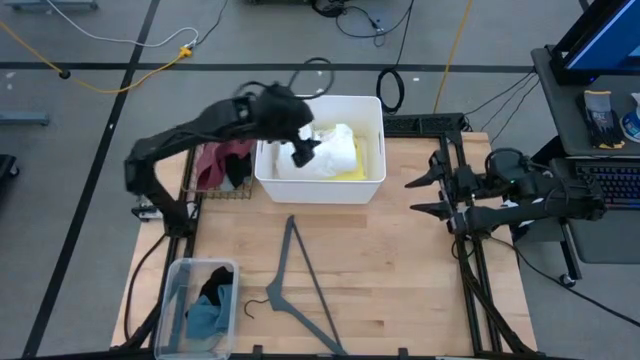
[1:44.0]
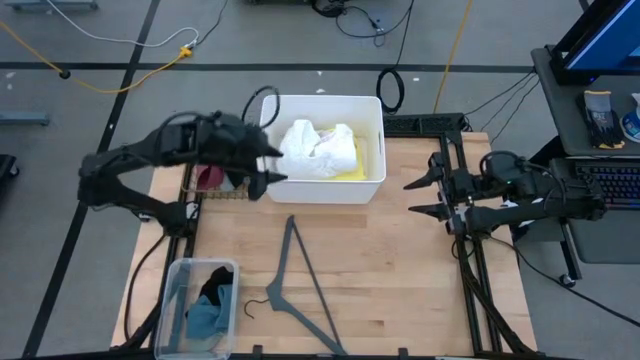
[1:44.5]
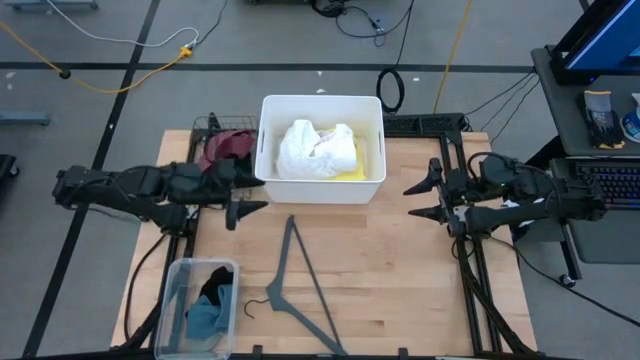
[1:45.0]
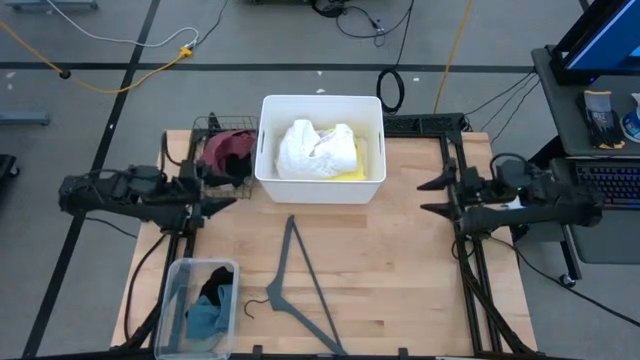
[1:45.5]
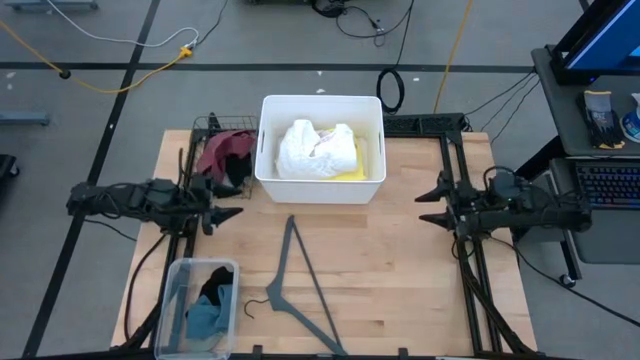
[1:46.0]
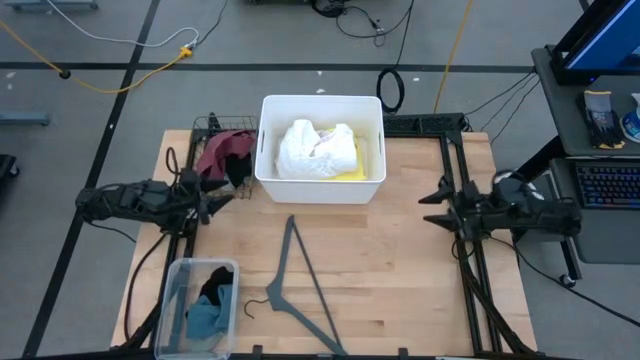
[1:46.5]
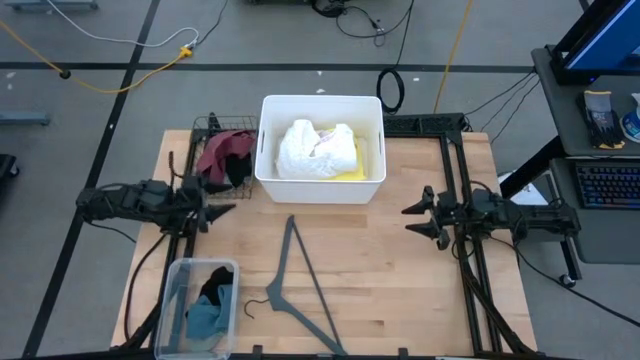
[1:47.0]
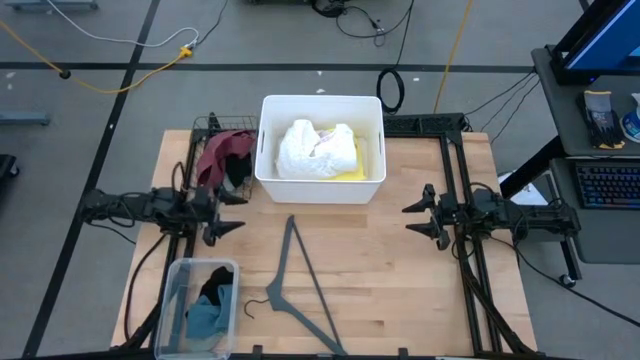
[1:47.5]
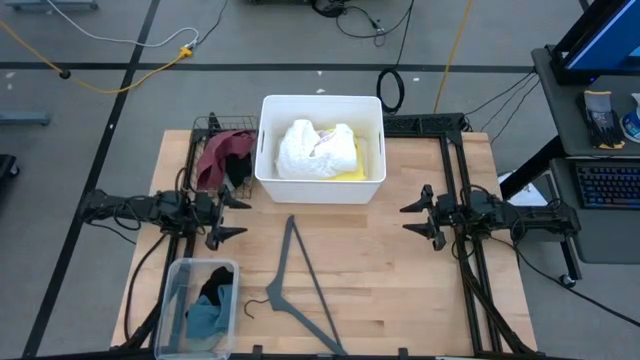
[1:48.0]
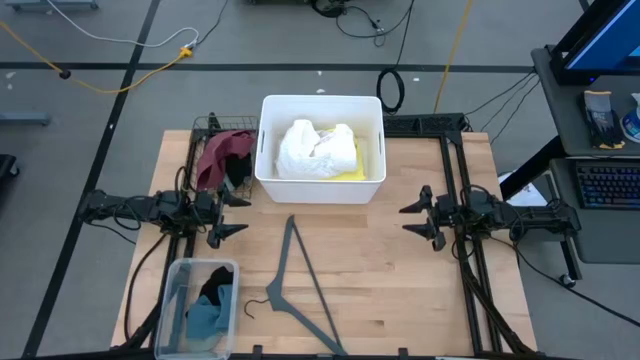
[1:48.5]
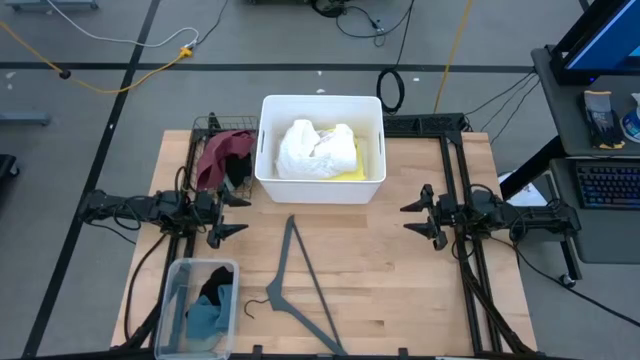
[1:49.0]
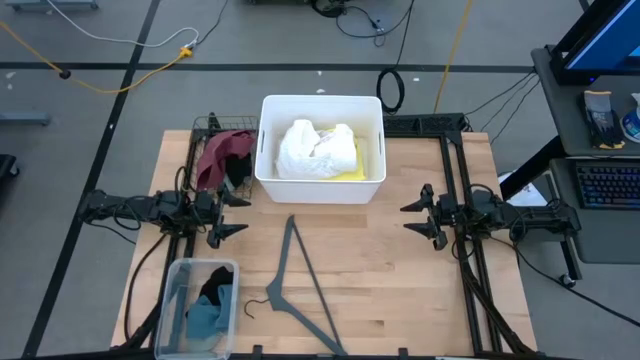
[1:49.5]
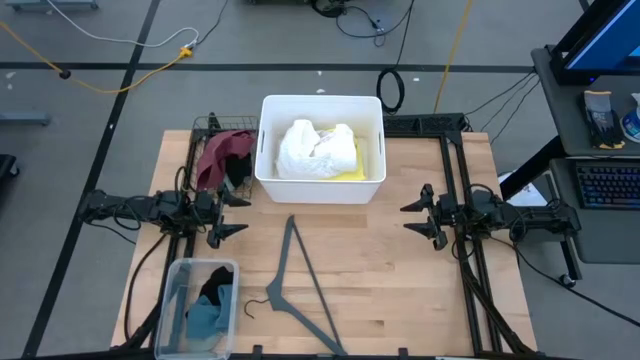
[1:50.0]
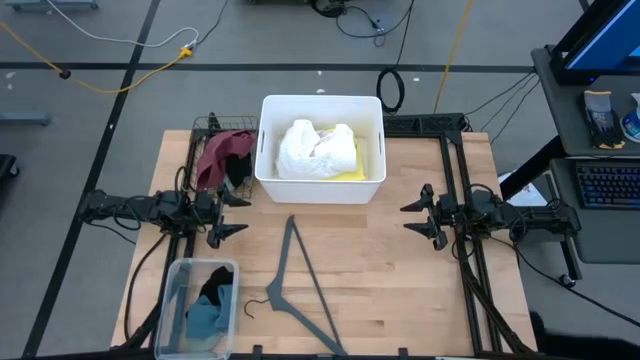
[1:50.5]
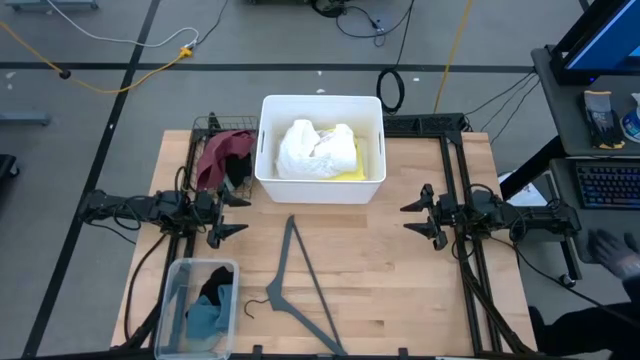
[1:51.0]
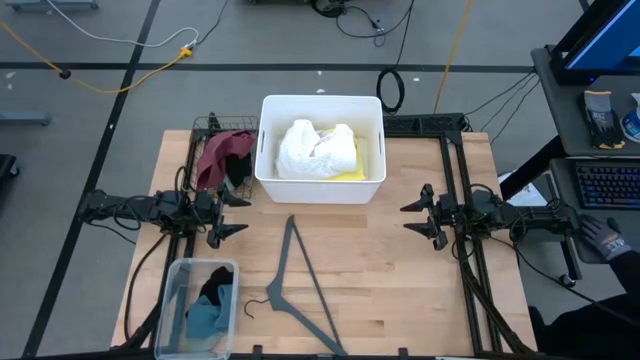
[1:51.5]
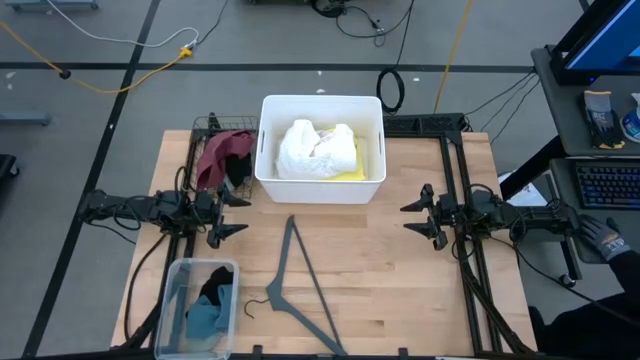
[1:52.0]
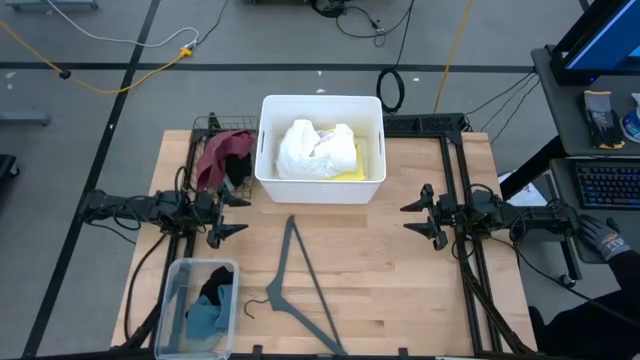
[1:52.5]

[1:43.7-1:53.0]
Task: Pick & Place Cloths
Return to Home Position

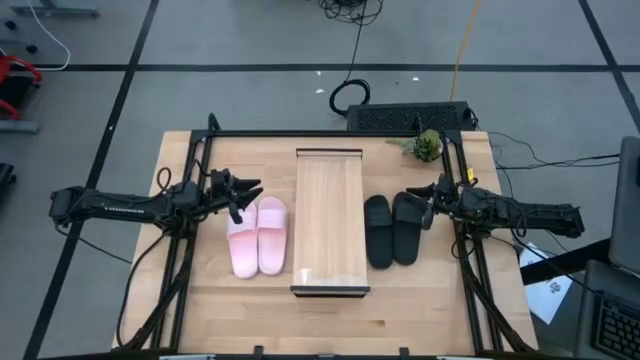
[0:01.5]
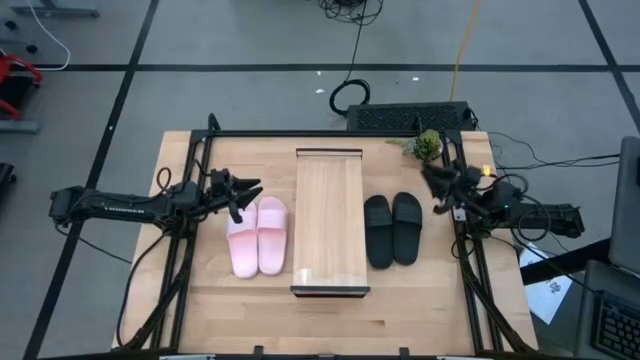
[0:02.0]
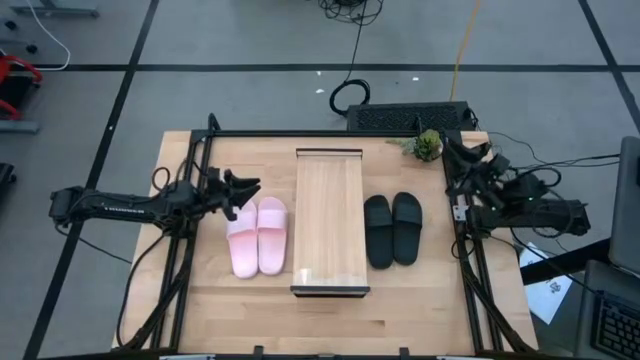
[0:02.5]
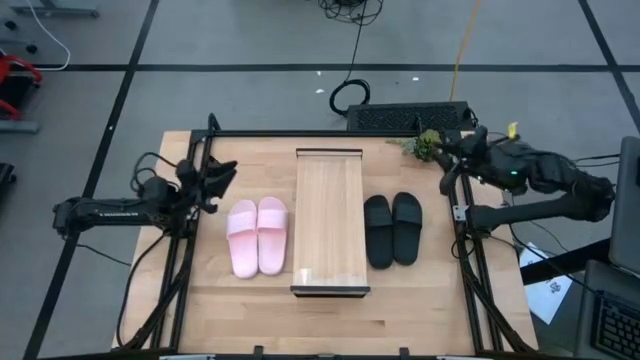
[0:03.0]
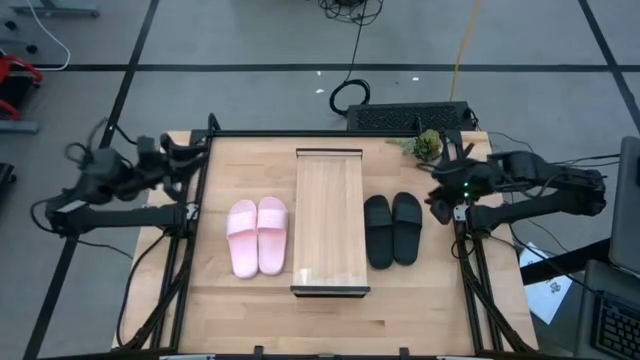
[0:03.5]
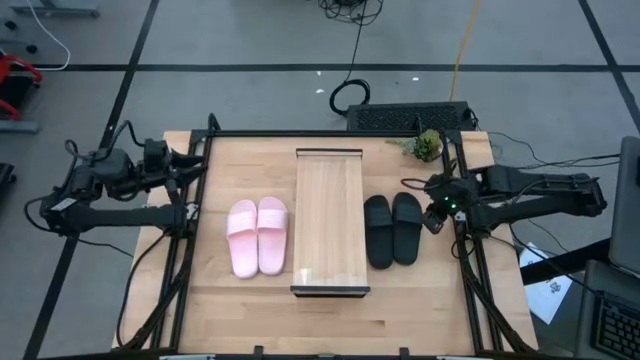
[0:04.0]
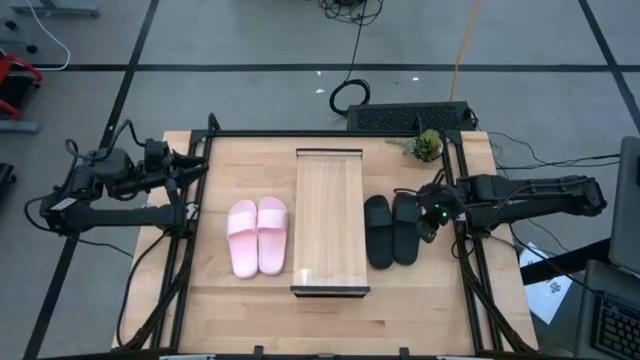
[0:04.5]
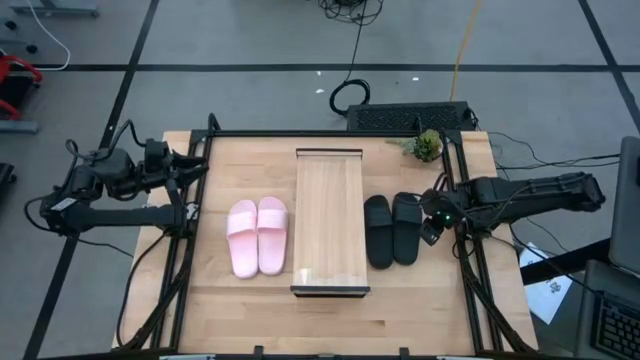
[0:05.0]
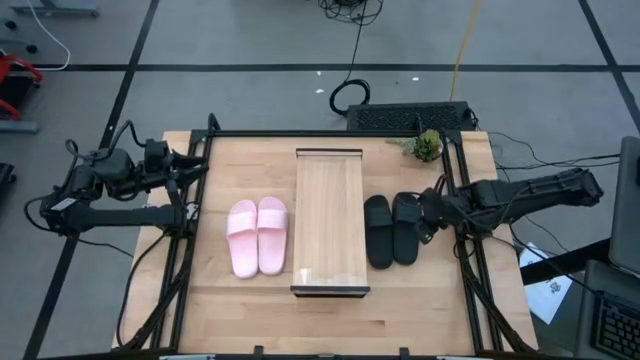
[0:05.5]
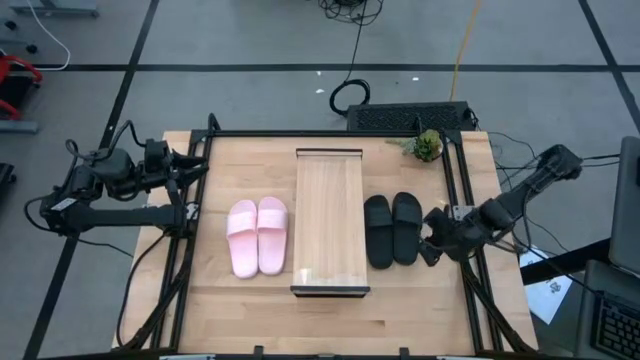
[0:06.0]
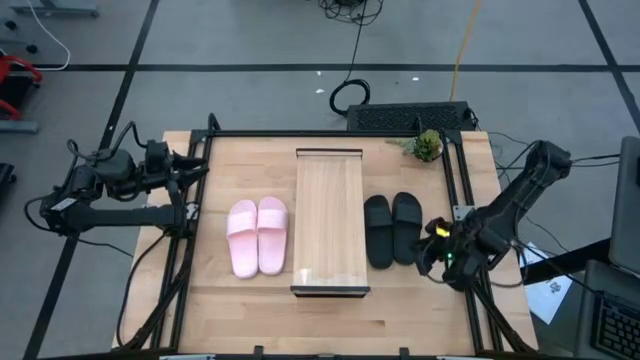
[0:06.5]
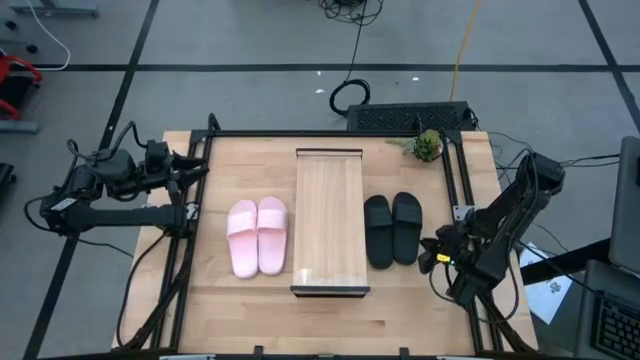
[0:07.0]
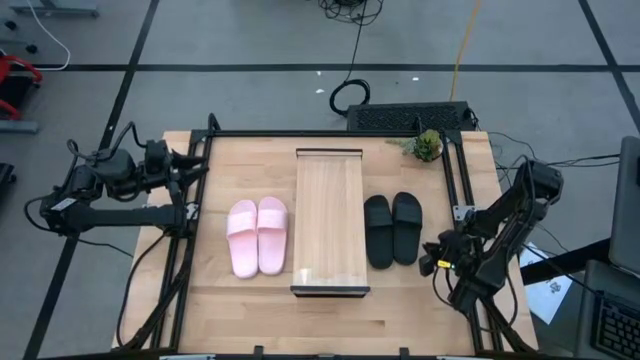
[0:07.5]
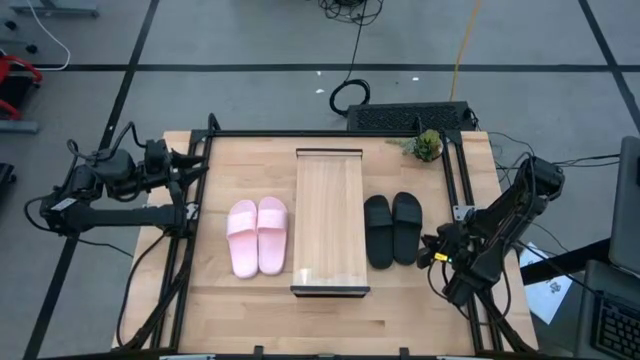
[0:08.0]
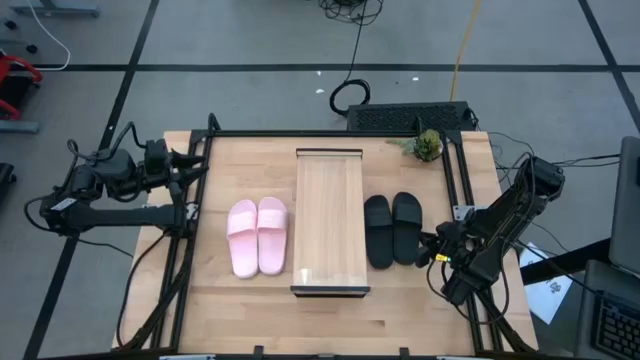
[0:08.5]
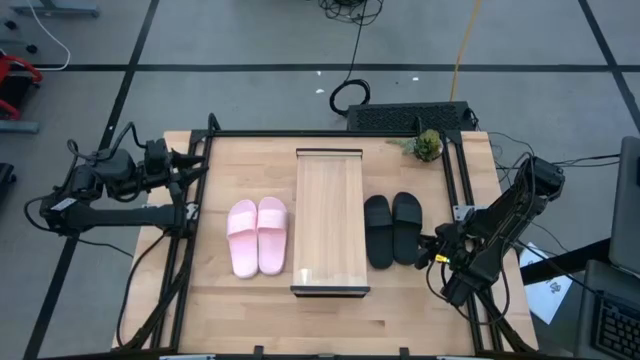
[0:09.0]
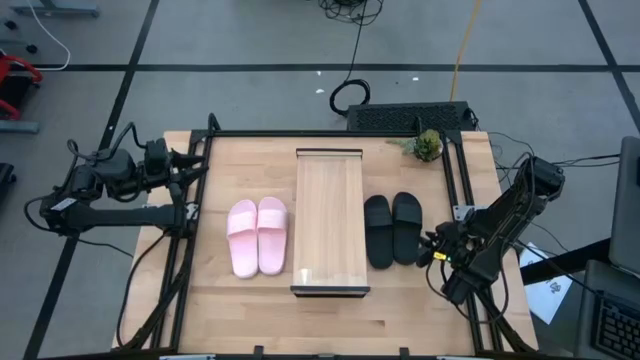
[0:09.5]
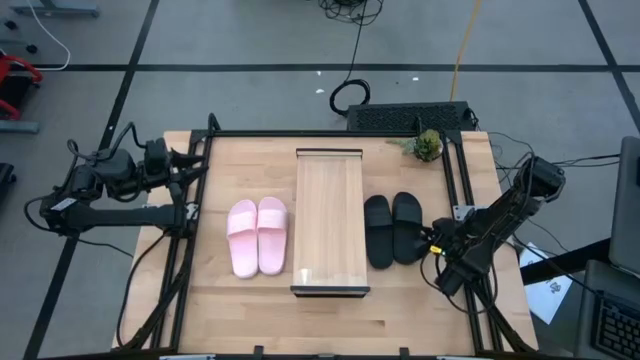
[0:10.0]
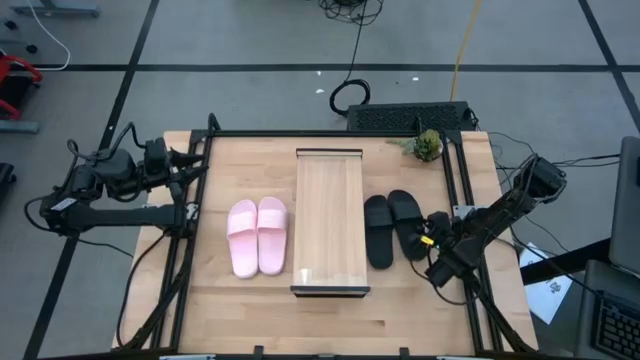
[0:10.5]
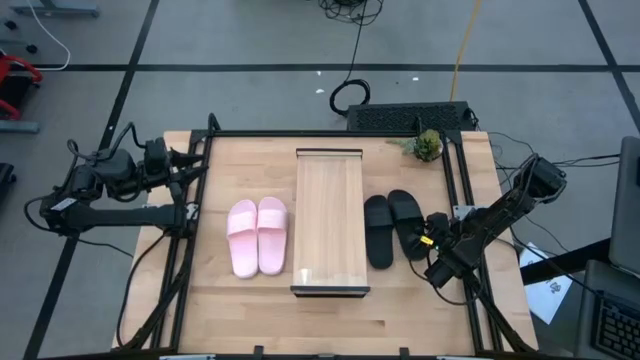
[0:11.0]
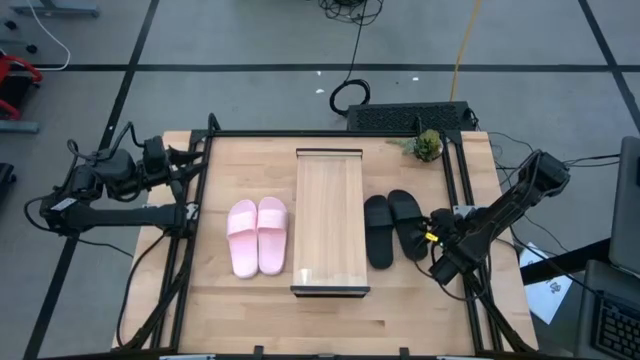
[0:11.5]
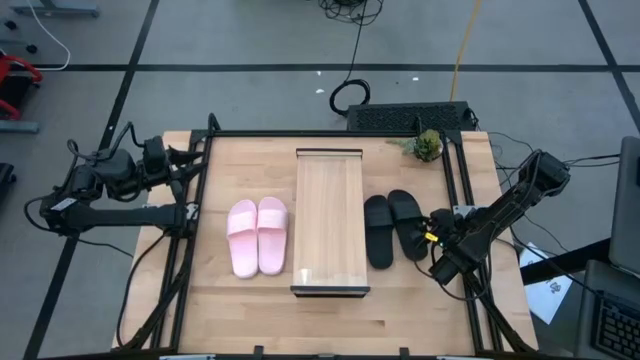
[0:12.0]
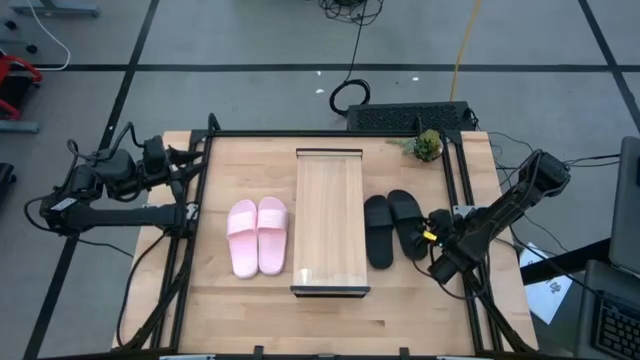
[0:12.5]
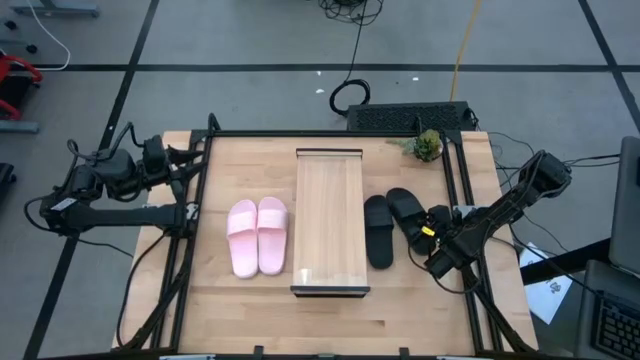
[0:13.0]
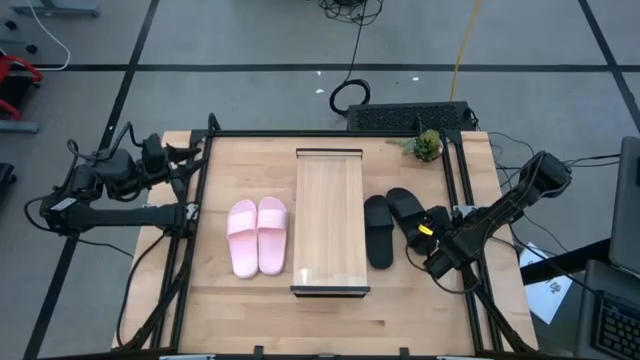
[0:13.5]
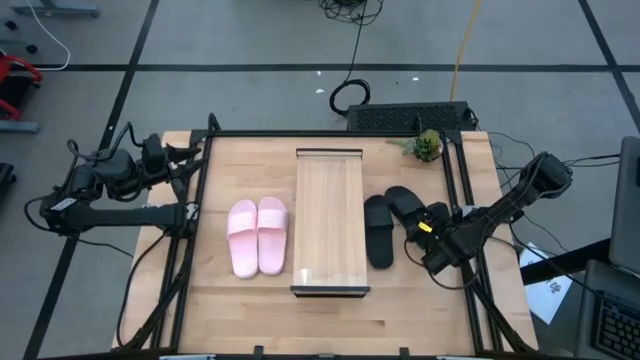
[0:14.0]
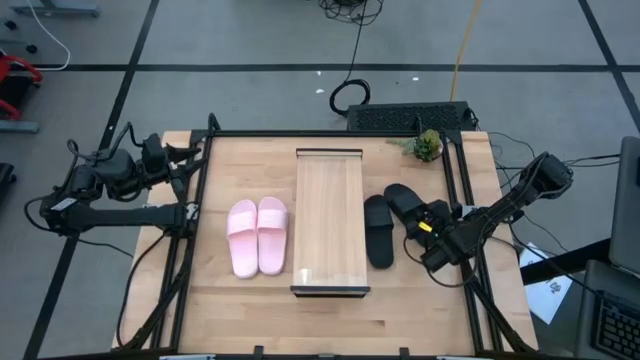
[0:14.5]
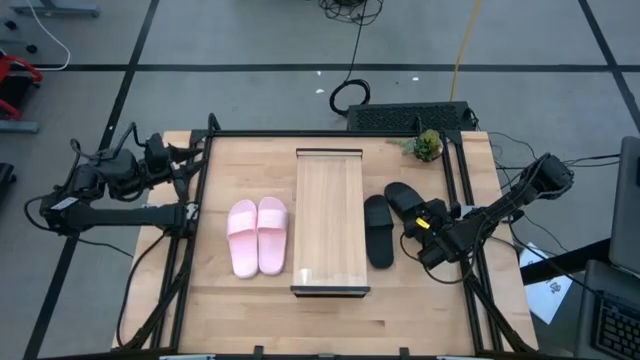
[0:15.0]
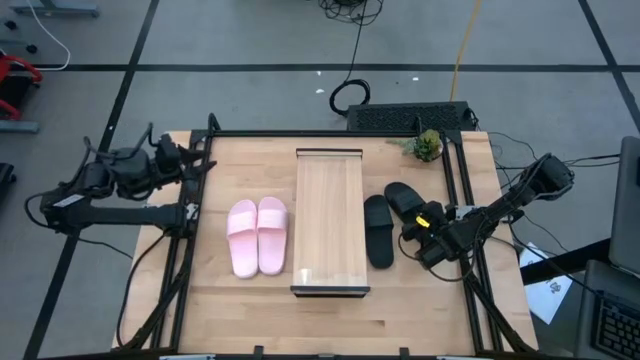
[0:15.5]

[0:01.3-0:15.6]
Task: Pick and place slides into the shelf
Put the right black slide on the shelf
